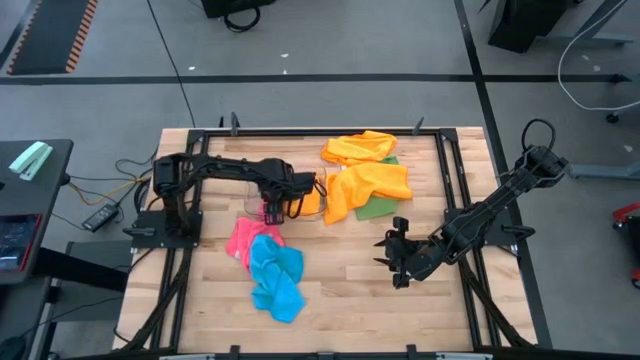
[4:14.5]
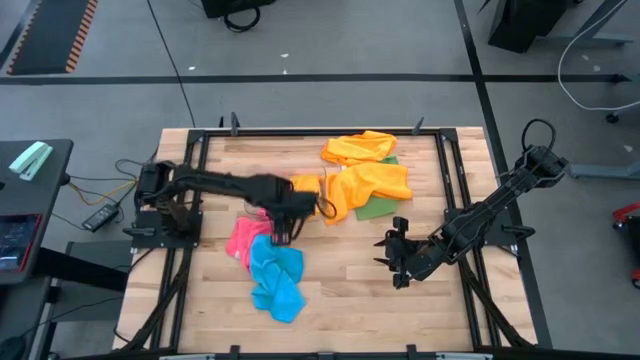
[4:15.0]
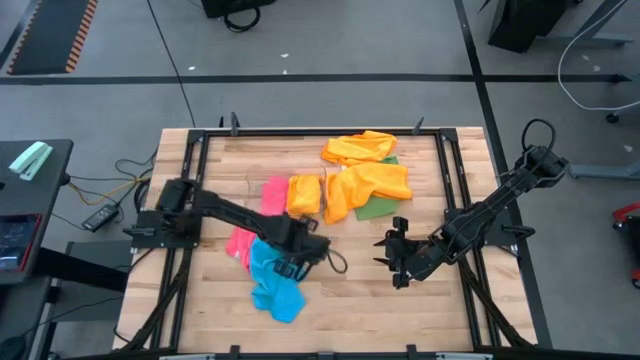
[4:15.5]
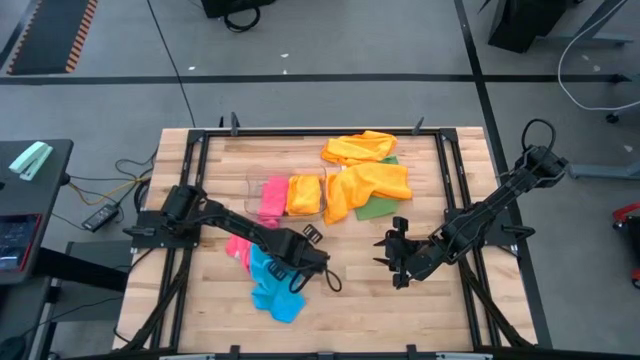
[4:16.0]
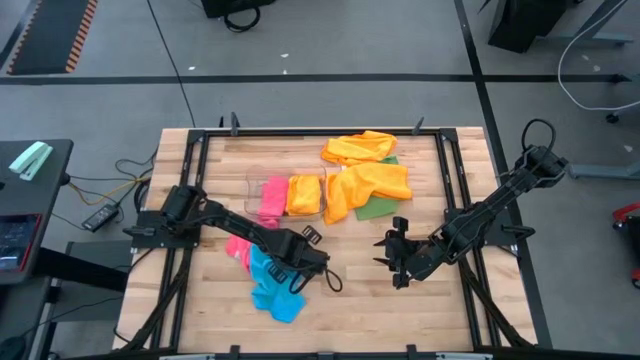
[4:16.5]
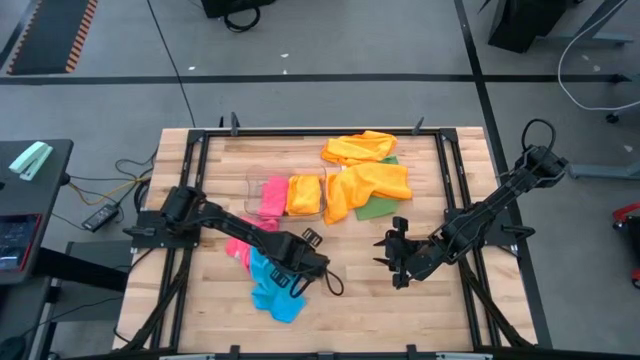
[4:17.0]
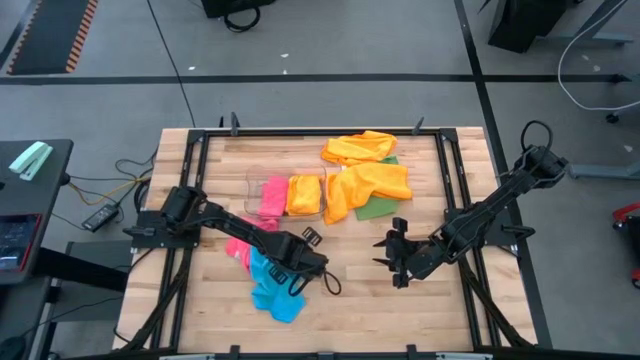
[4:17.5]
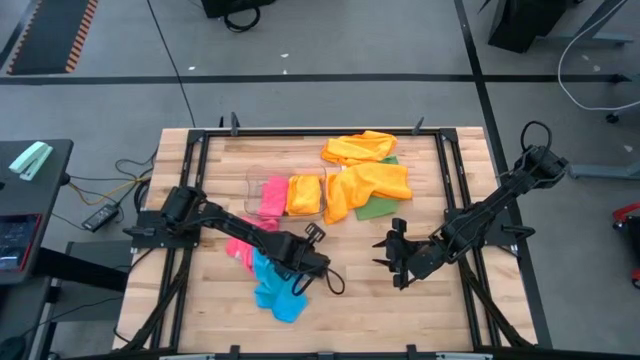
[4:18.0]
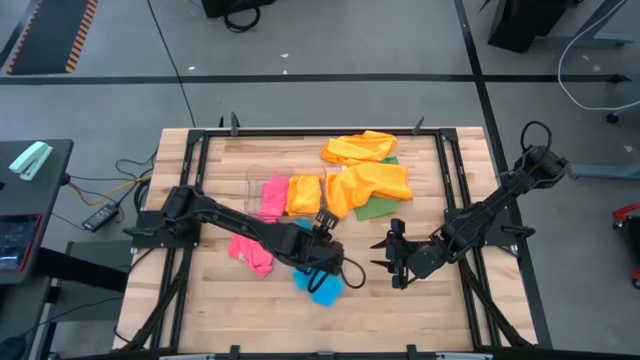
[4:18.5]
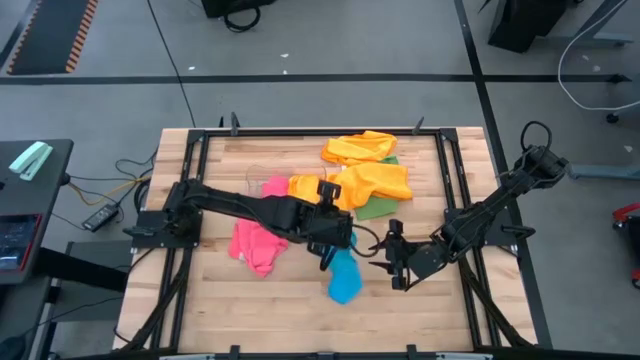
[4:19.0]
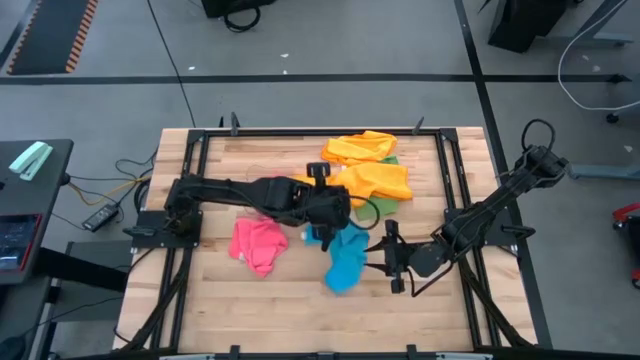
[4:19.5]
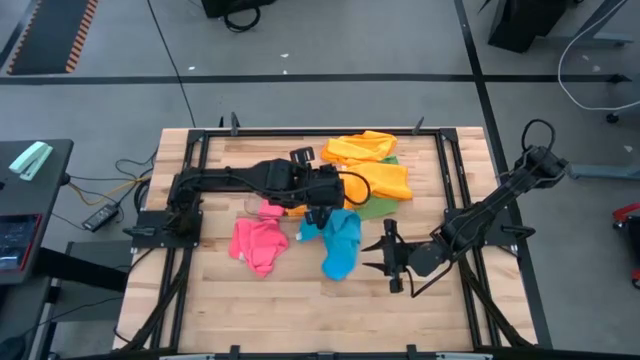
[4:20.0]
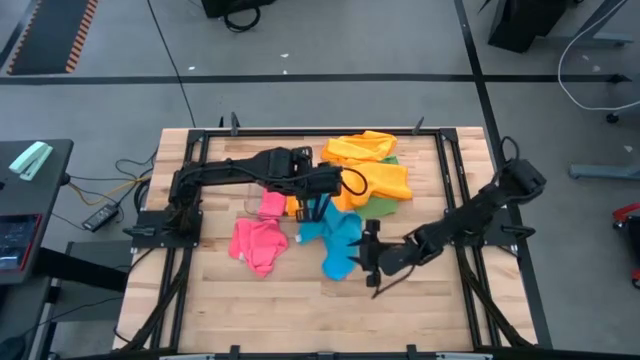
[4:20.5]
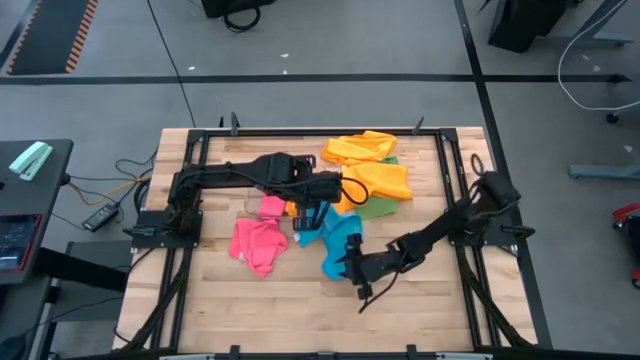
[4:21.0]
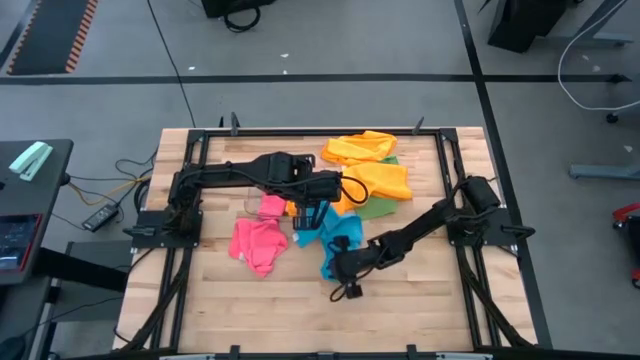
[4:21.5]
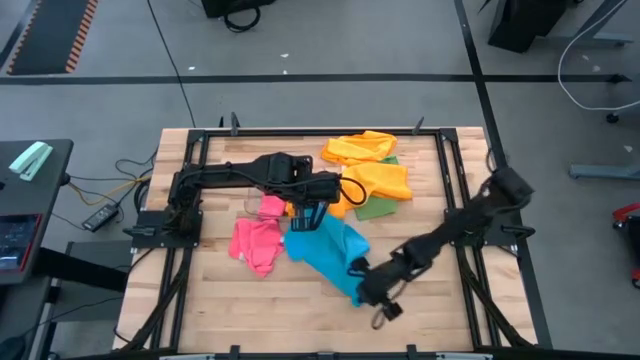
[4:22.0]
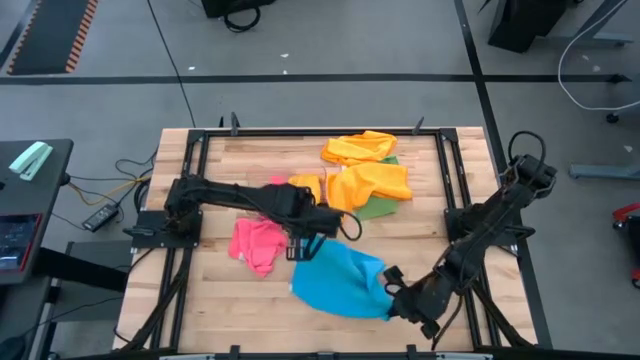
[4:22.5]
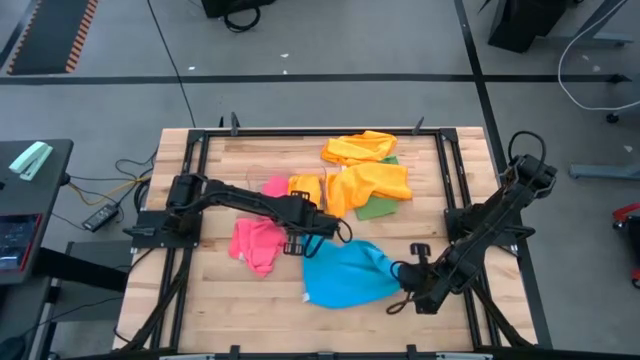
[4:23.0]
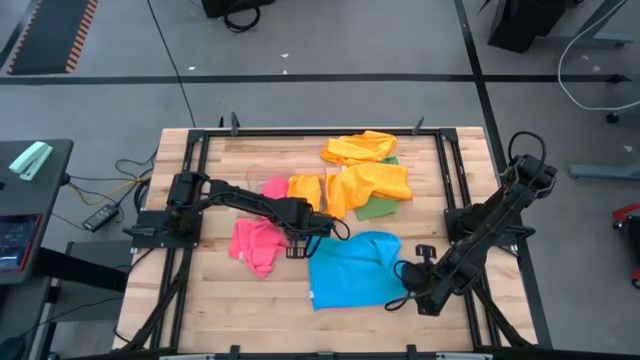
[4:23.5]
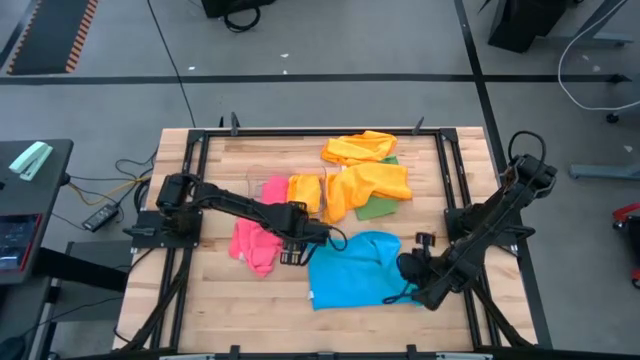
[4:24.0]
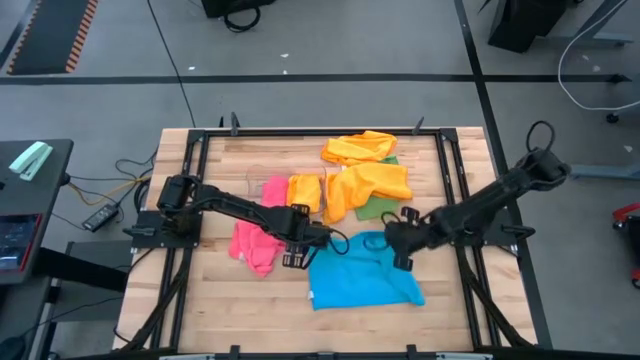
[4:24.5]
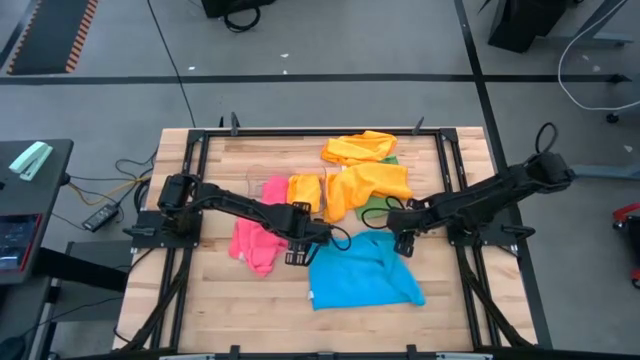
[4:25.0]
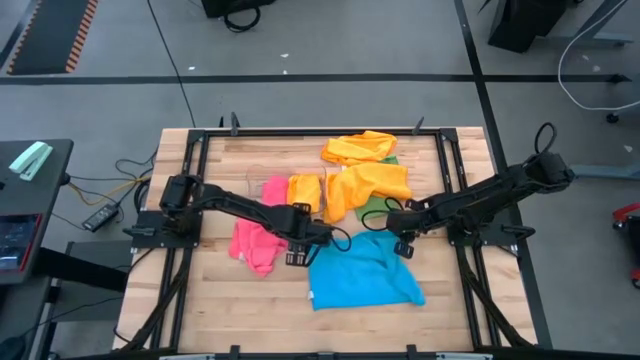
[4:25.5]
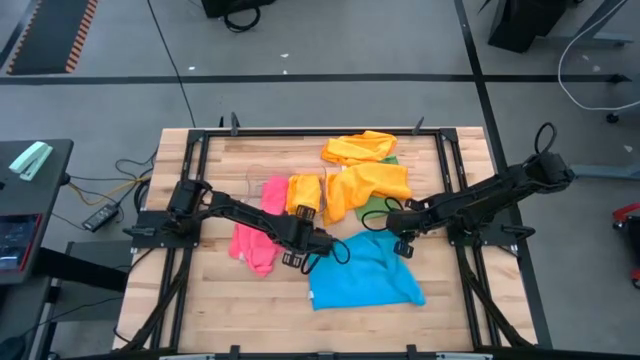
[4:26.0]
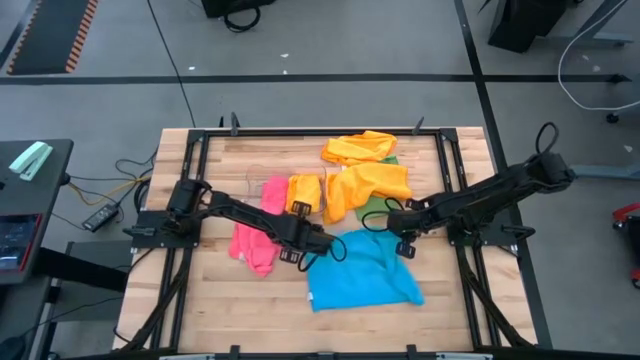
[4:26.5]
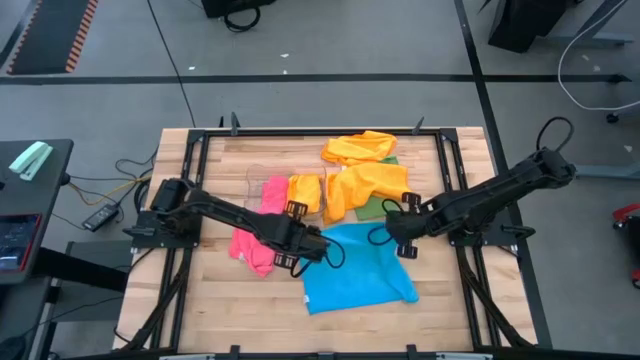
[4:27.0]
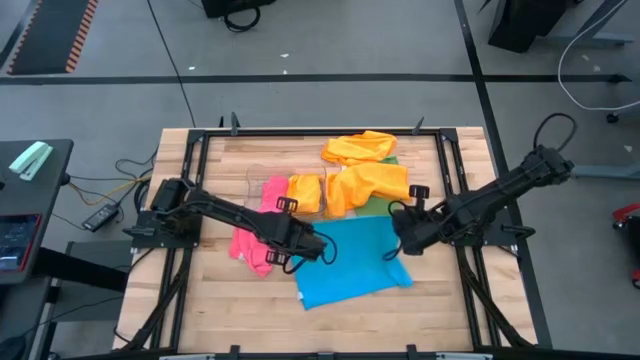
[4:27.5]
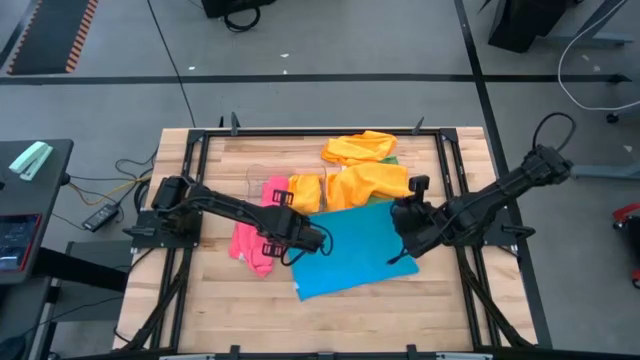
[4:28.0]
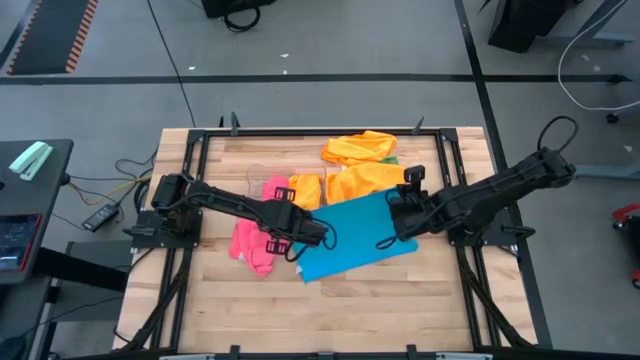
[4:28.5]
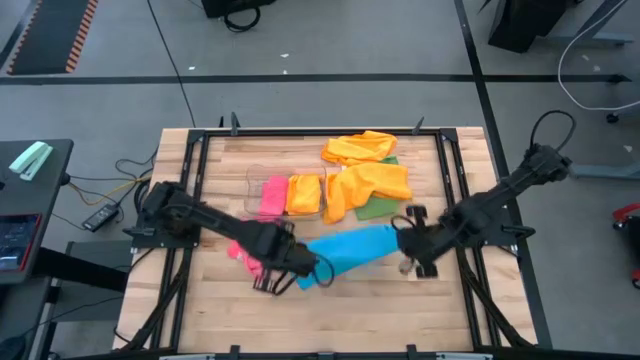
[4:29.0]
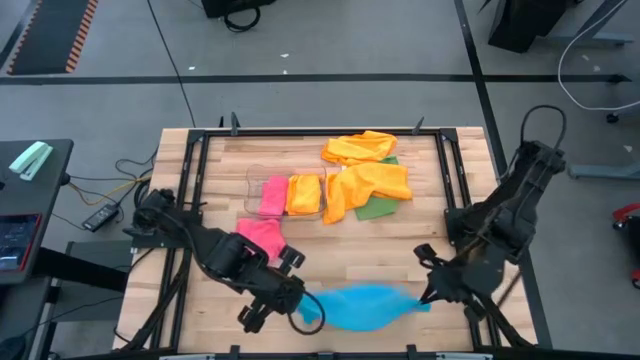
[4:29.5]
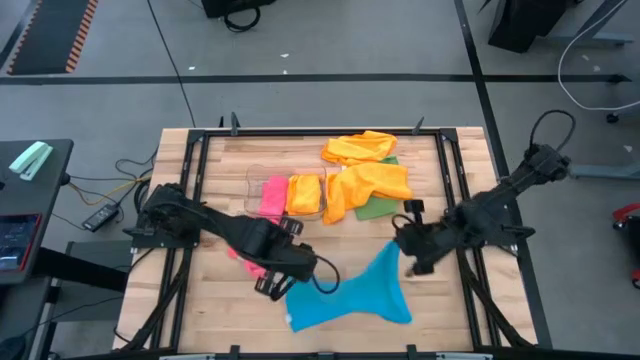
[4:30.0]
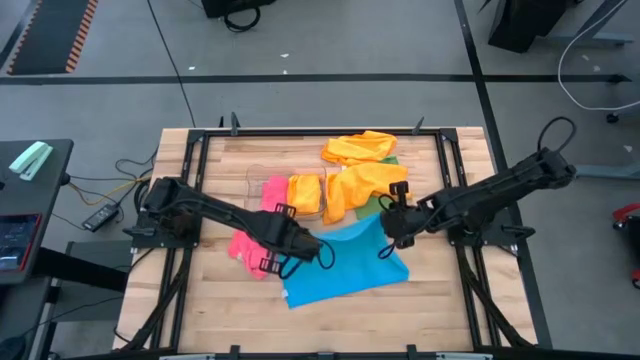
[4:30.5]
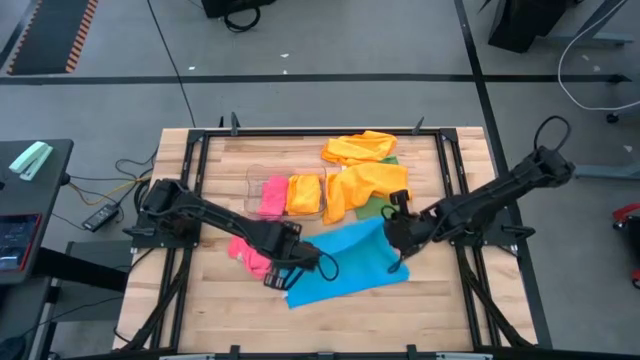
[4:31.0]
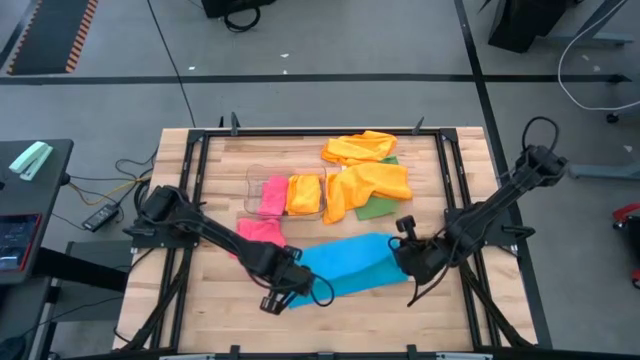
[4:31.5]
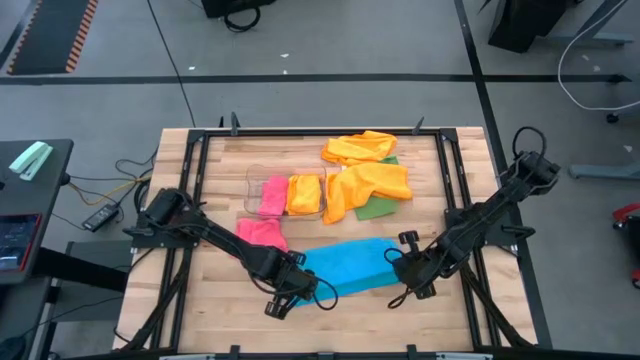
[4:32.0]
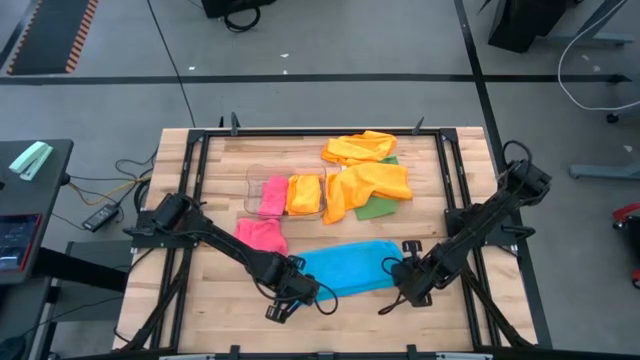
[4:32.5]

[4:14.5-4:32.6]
Task: Fold microfiber towels
Fold the blue microfiber cloth
